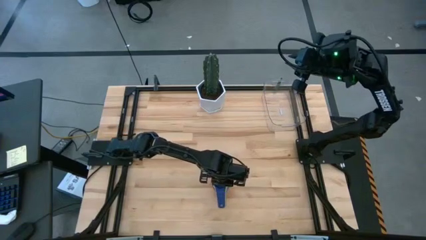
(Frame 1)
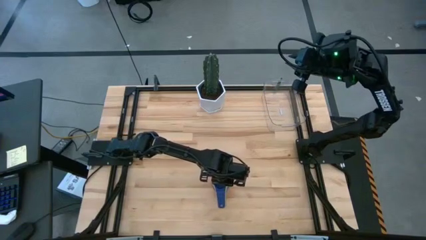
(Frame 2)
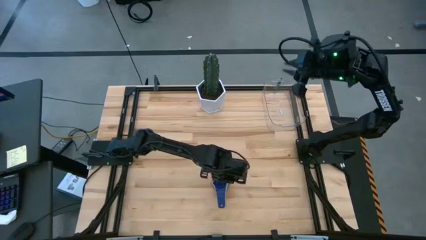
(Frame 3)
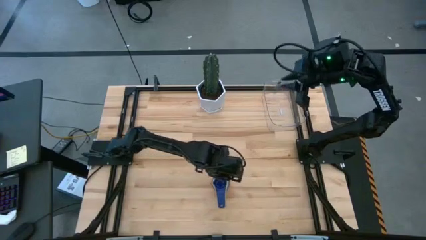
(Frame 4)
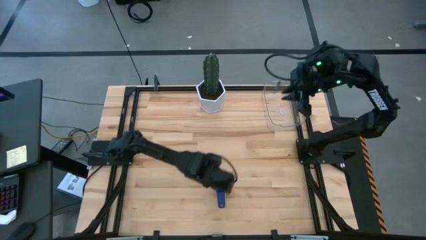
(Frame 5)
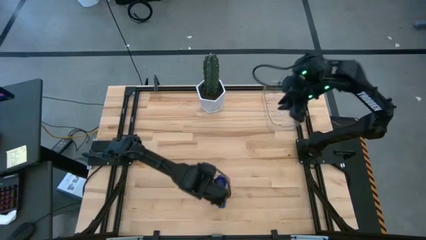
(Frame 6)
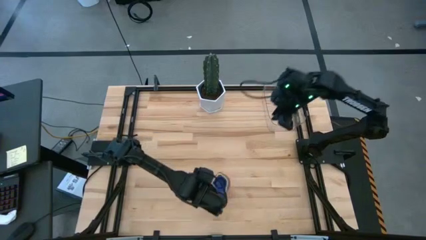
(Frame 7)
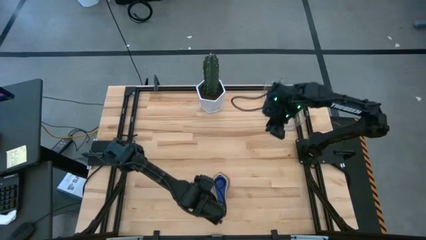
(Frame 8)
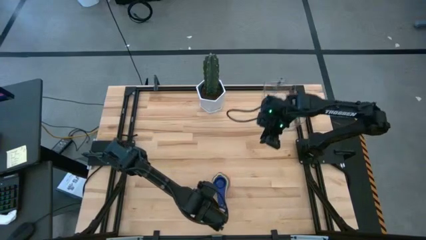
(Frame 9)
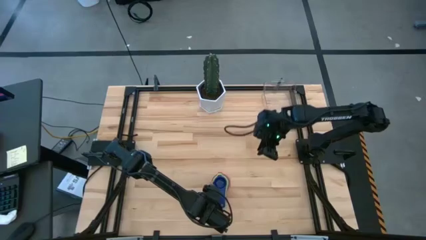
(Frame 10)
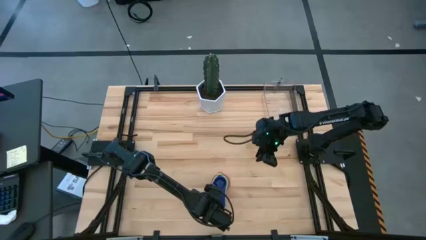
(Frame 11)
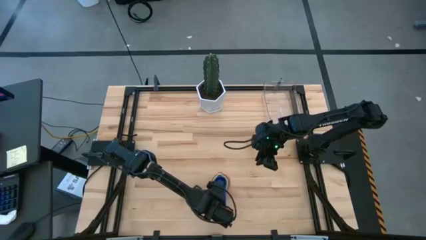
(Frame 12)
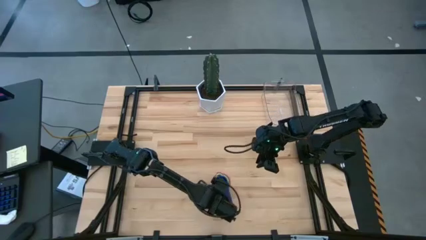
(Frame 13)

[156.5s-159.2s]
Task: Nest measuring cups in basket
Adjust the stacked measuring cups

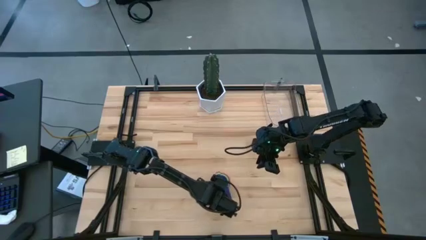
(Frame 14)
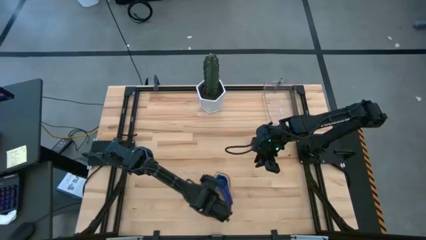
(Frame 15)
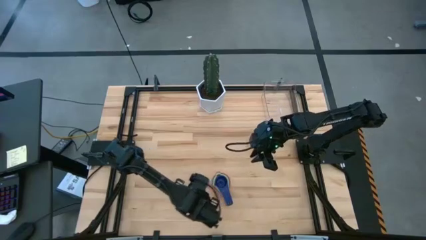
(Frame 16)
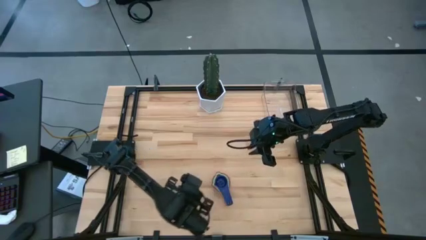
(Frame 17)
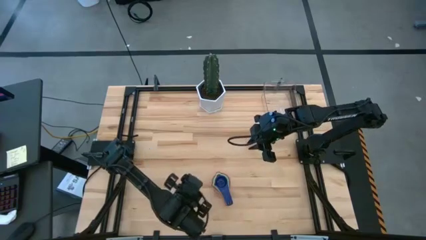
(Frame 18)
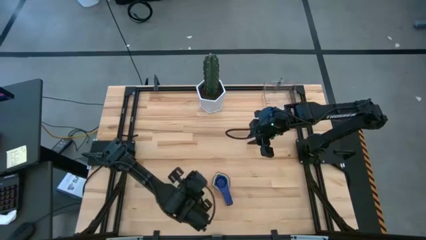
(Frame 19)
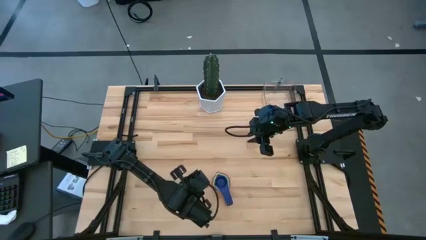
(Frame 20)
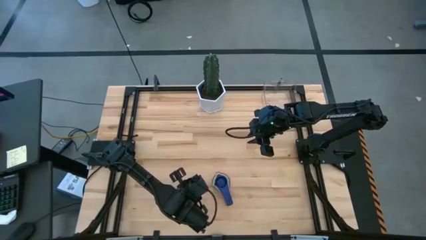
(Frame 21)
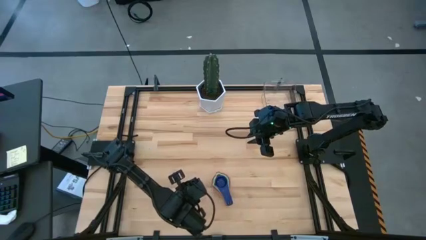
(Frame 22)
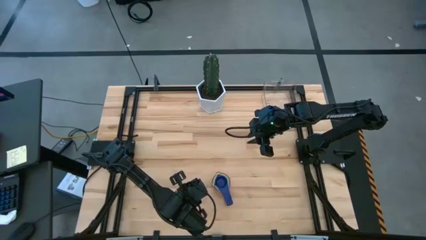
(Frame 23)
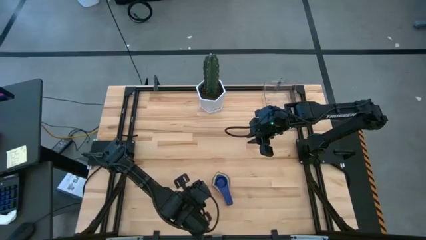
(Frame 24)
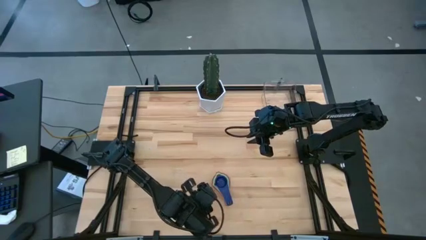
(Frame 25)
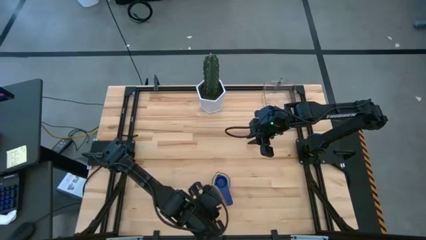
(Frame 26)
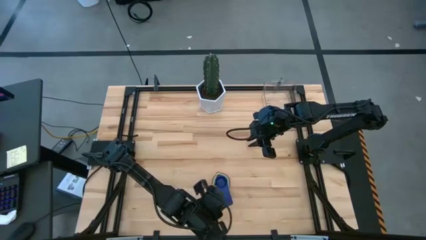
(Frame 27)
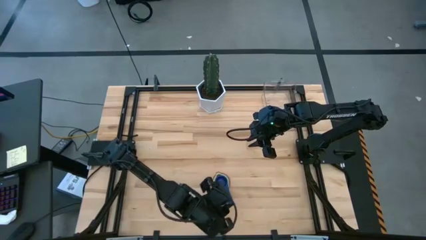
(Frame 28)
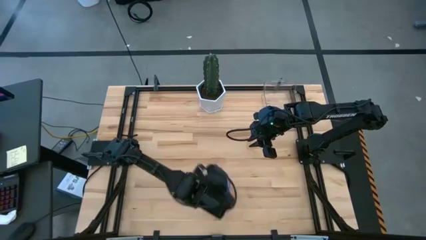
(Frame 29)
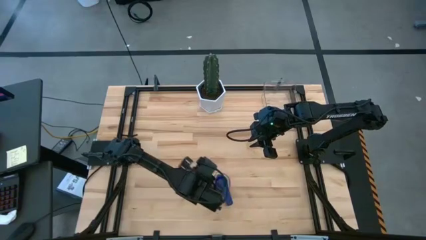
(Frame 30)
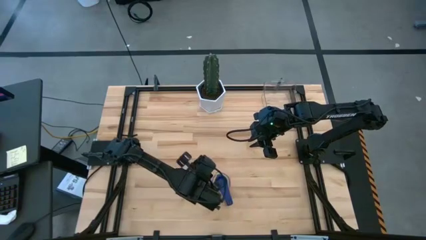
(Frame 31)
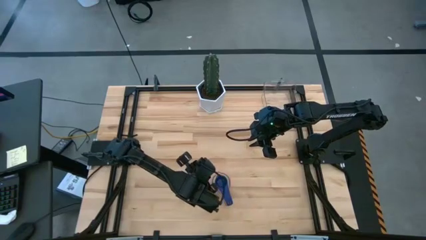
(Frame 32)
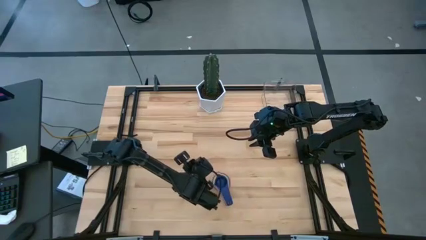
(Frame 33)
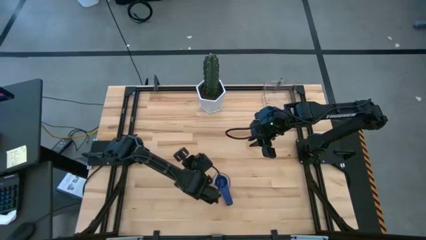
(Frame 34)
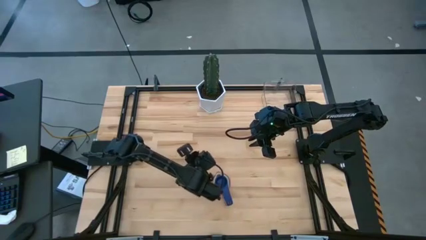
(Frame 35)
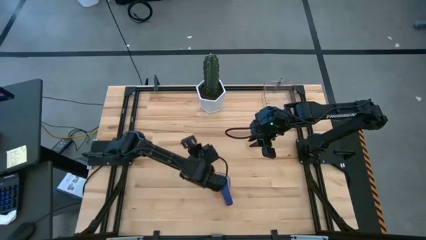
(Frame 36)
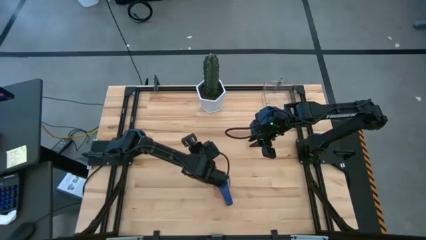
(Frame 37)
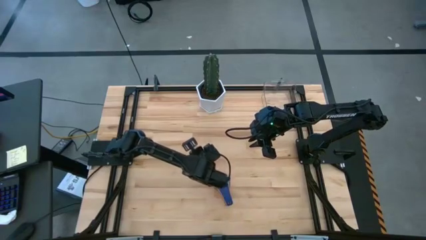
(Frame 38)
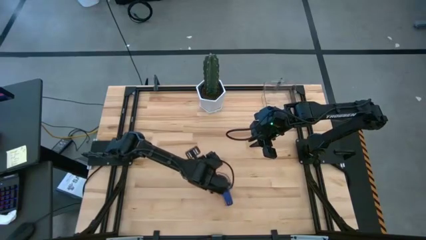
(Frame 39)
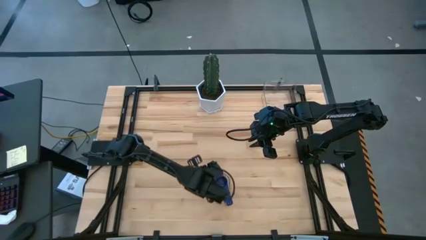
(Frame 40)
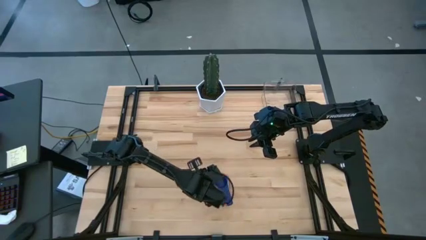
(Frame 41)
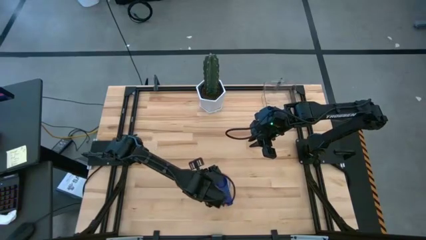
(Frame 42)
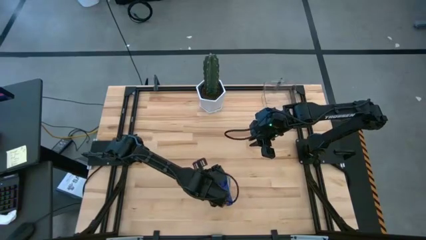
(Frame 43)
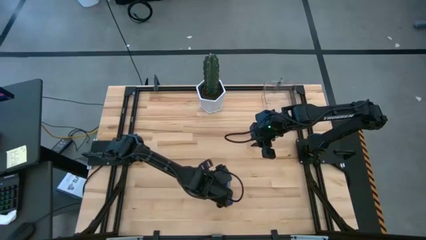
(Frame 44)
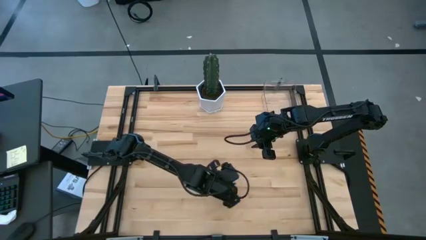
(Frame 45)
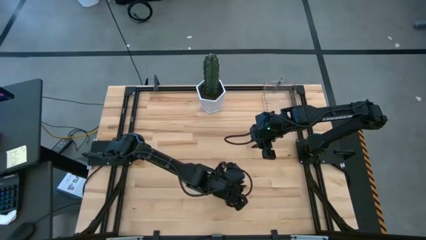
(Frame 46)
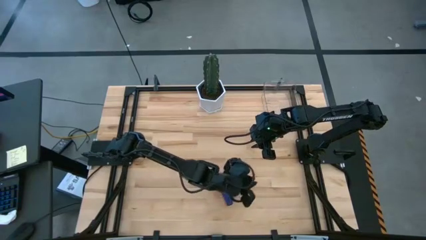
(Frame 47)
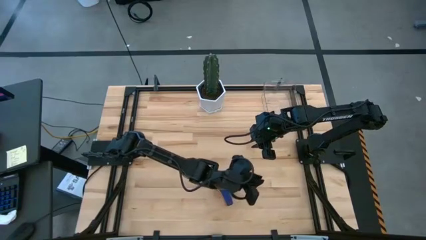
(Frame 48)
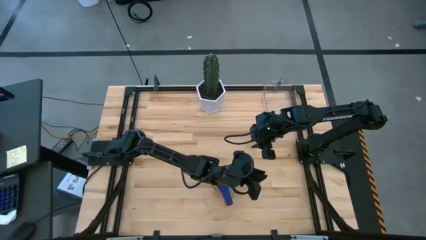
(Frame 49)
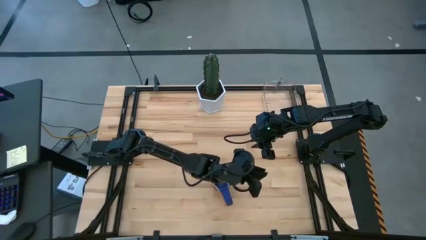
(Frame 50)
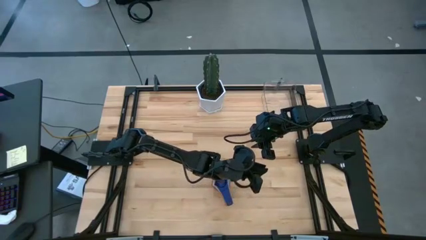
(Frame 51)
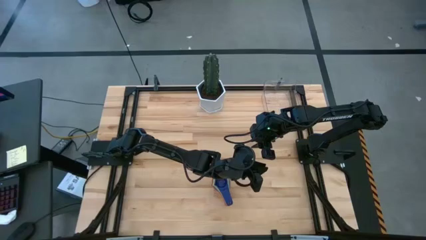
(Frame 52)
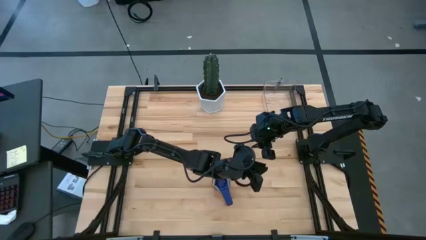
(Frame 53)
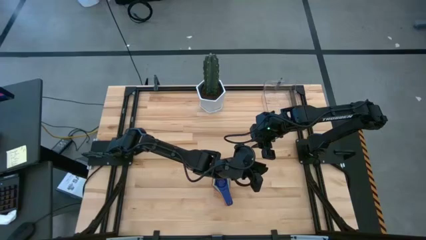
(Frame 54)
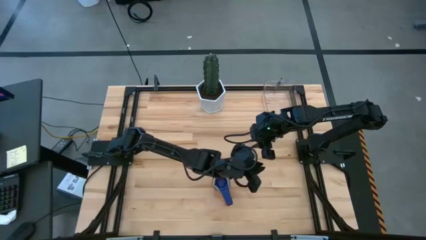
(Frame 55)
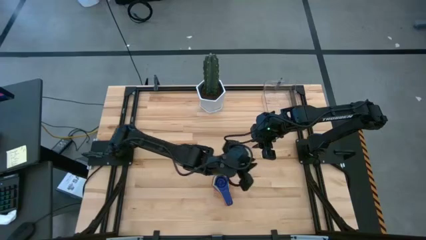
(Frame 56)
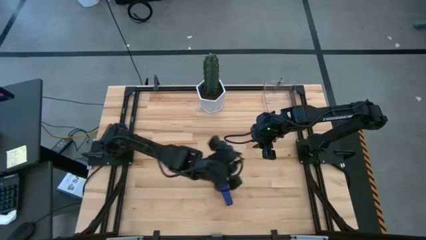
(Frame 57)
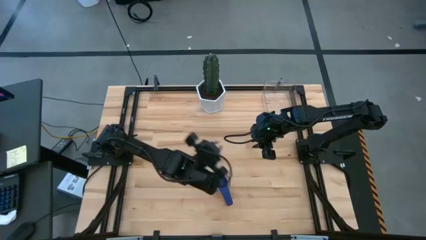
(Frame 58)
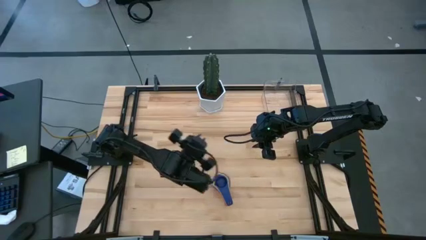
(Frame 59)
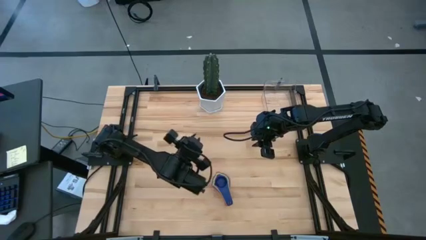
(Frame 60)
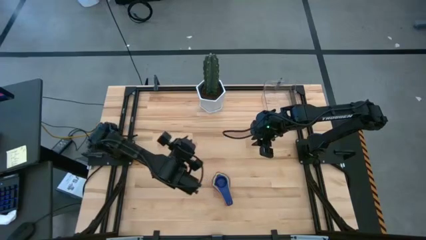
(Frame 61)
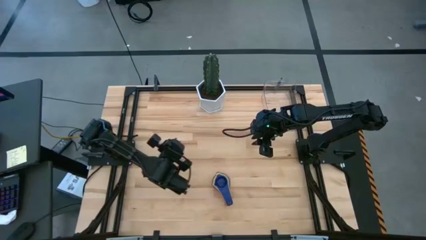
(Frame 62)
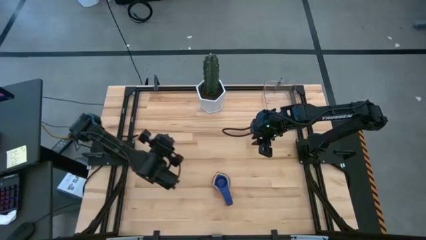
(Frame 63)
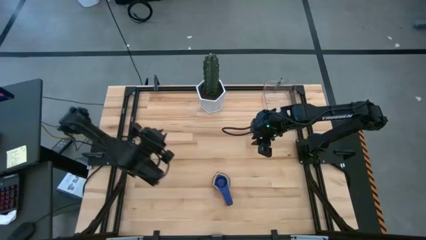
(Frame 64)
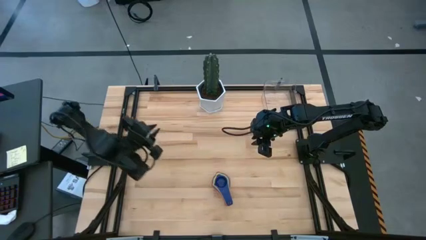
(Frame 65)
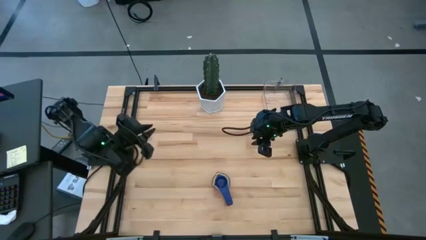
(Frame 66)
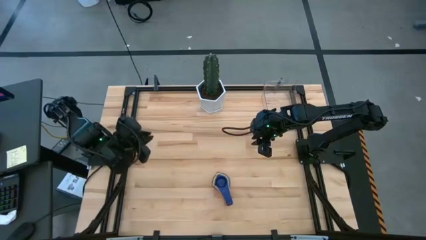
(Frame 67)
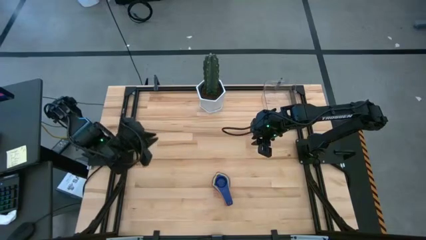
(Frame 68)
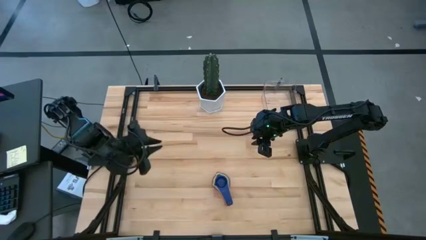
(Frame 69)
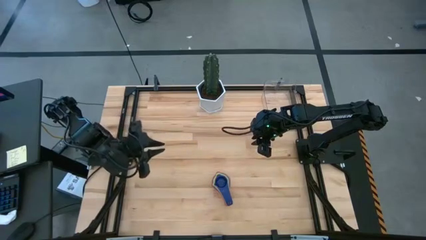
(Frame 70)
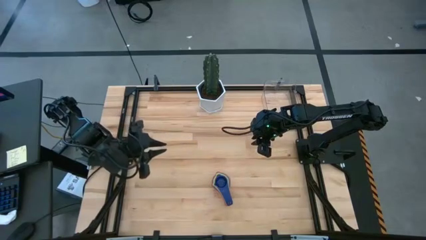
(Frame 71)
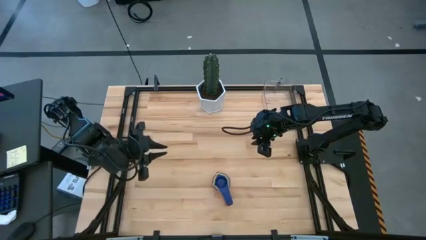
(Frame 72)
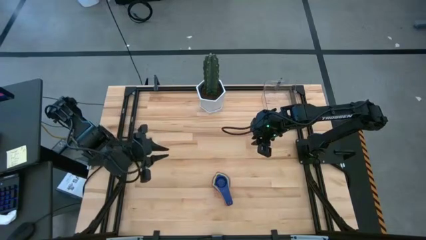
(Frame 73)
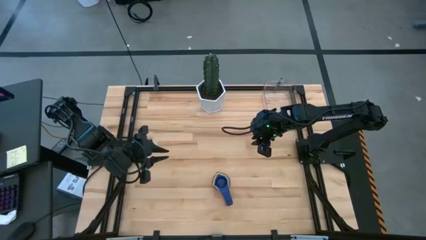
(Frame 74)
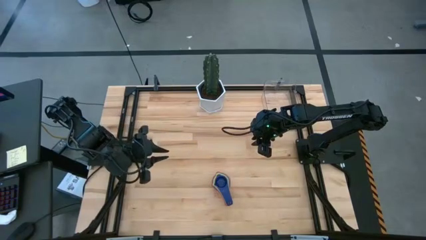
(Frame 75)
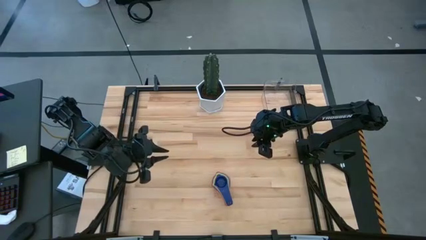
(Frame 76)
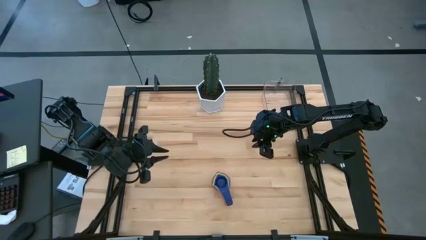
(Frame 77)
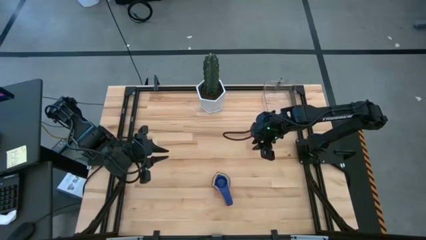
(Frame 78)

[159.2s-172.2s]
Put the stacked measuring cups into the transparent bin
